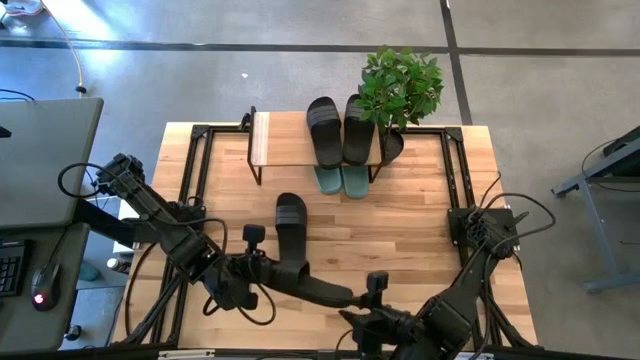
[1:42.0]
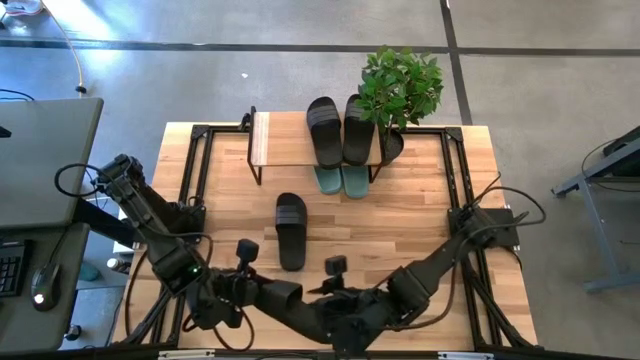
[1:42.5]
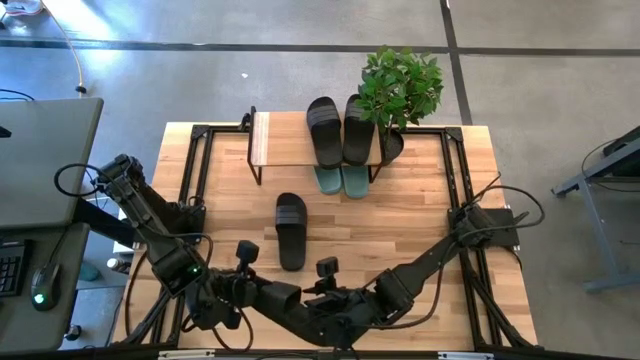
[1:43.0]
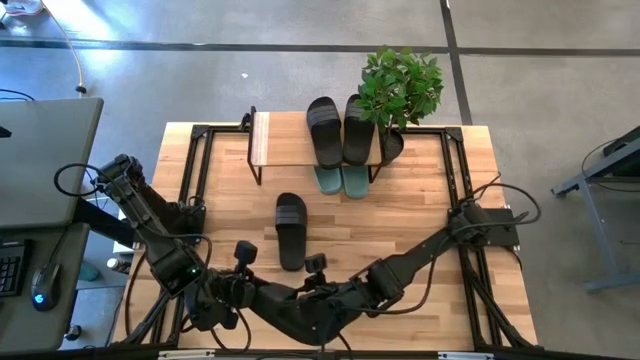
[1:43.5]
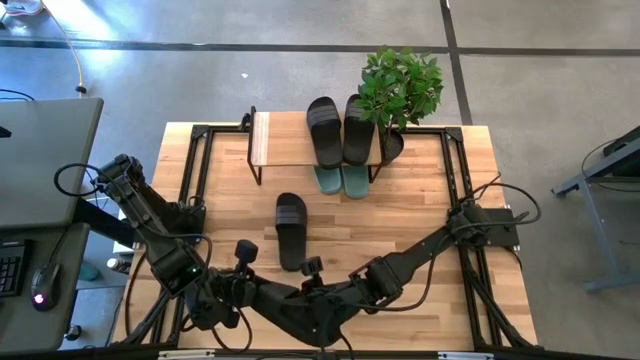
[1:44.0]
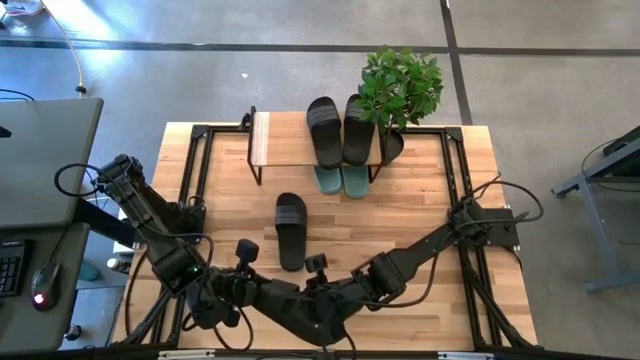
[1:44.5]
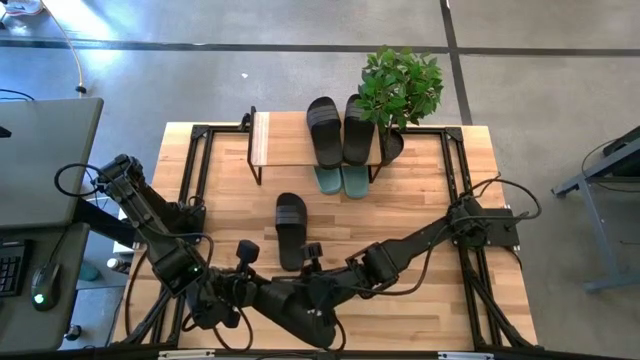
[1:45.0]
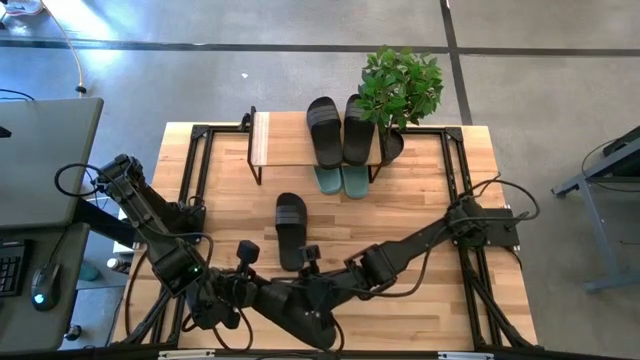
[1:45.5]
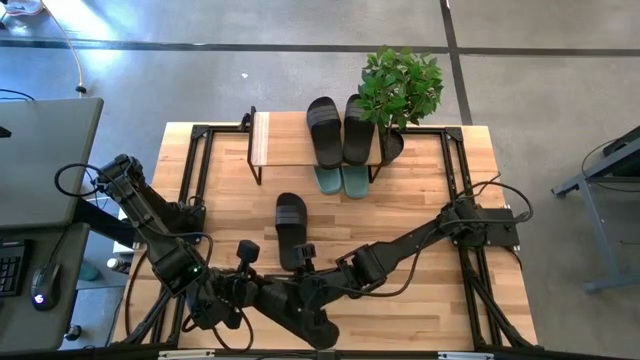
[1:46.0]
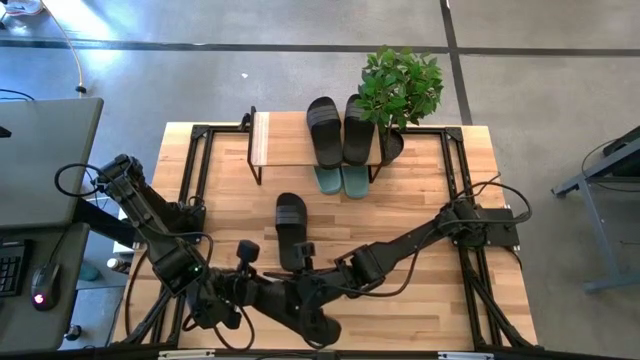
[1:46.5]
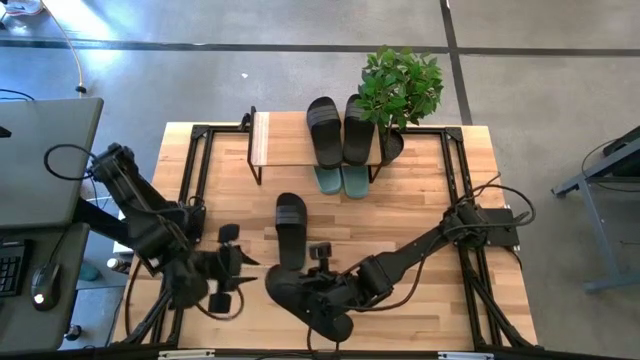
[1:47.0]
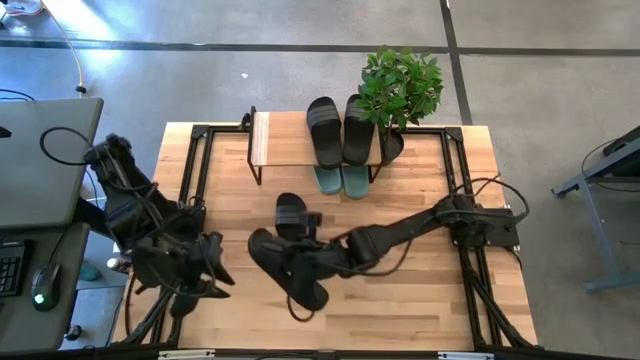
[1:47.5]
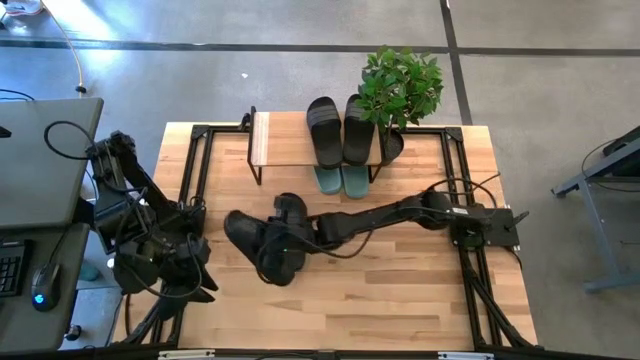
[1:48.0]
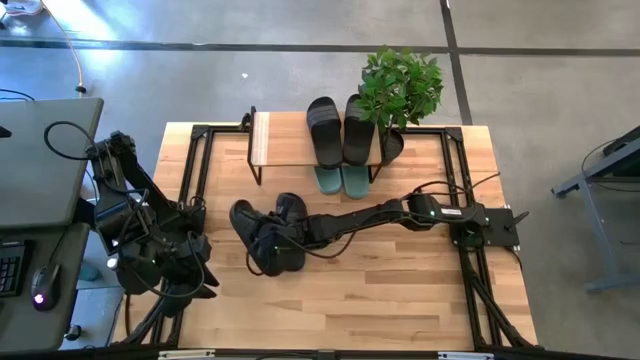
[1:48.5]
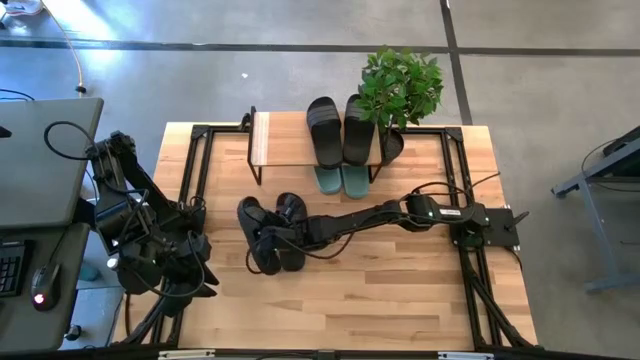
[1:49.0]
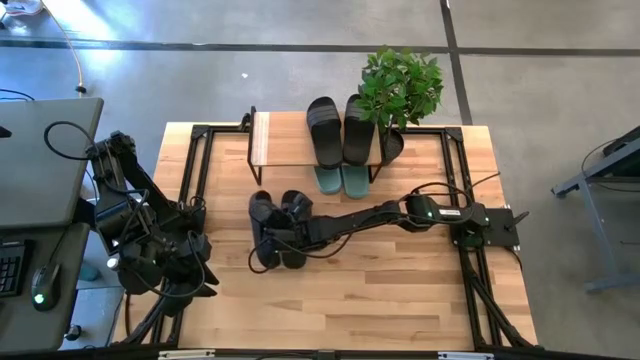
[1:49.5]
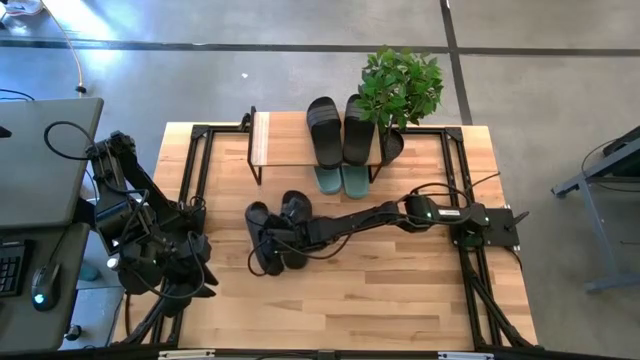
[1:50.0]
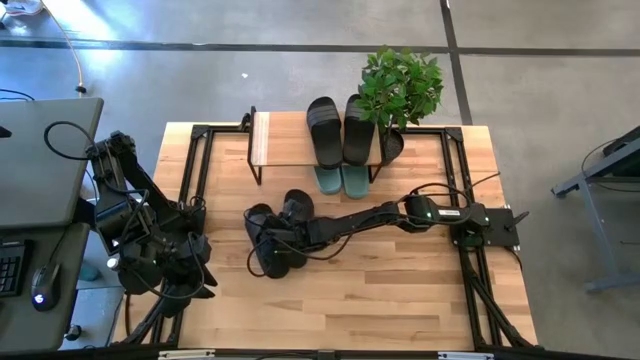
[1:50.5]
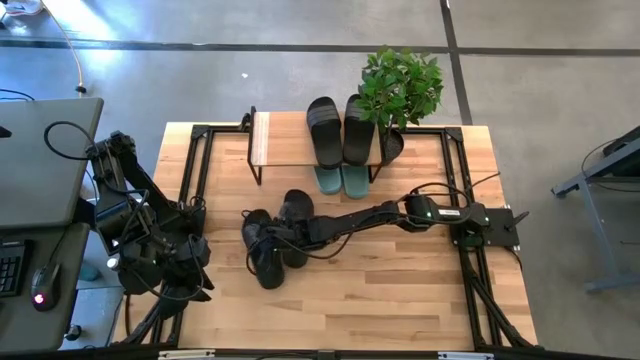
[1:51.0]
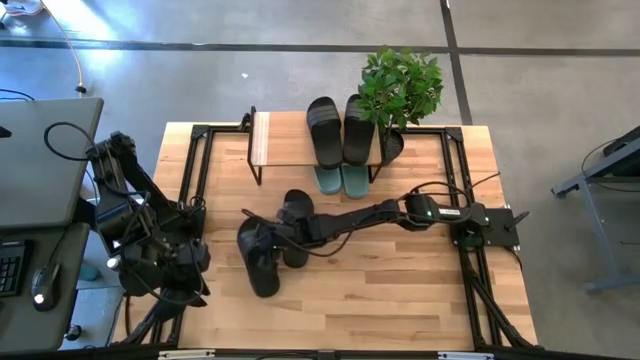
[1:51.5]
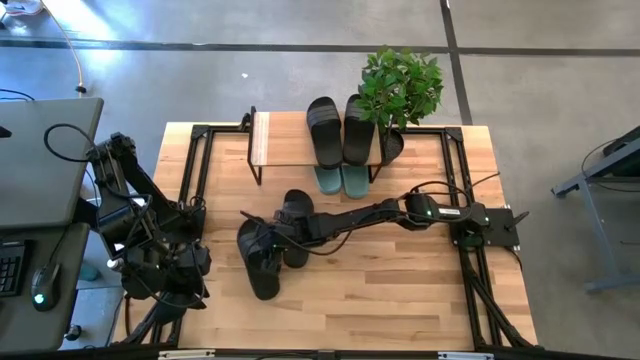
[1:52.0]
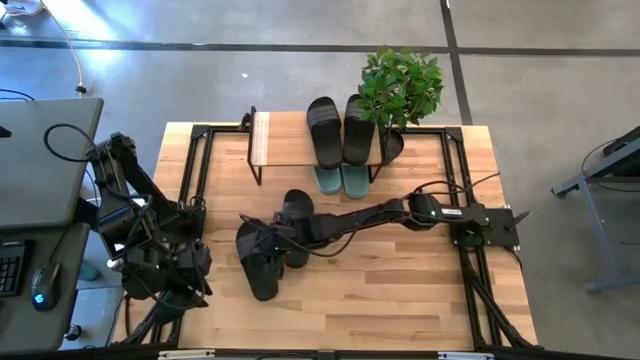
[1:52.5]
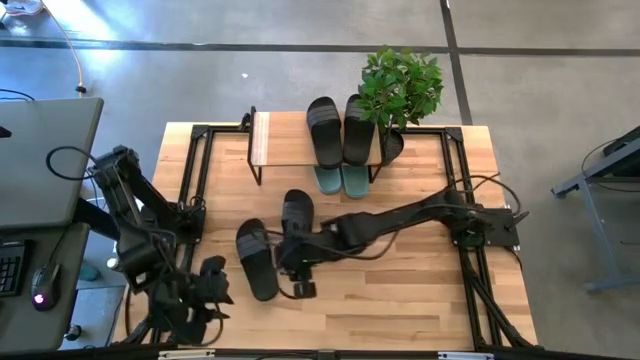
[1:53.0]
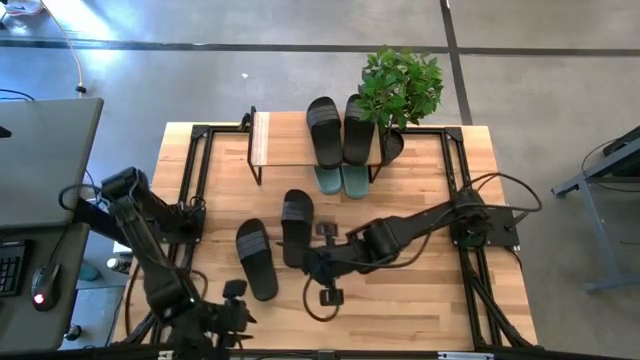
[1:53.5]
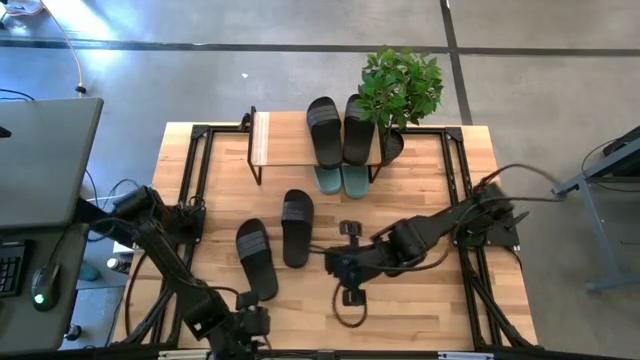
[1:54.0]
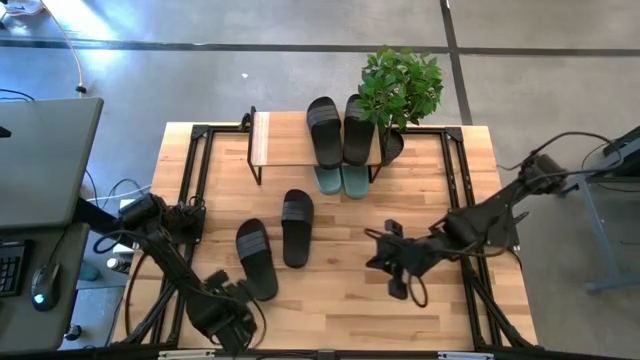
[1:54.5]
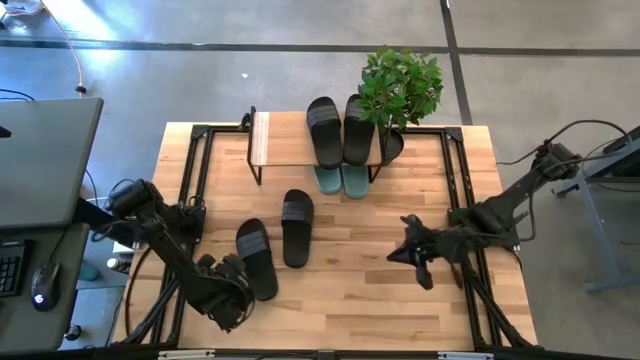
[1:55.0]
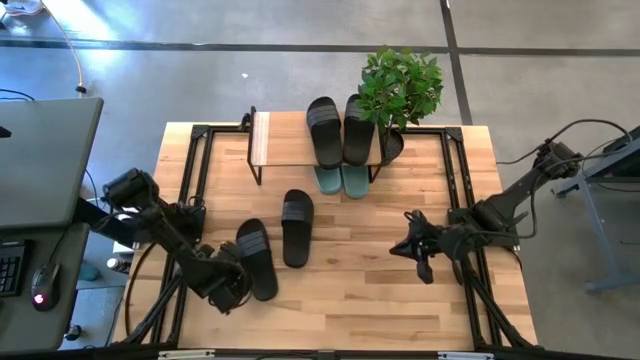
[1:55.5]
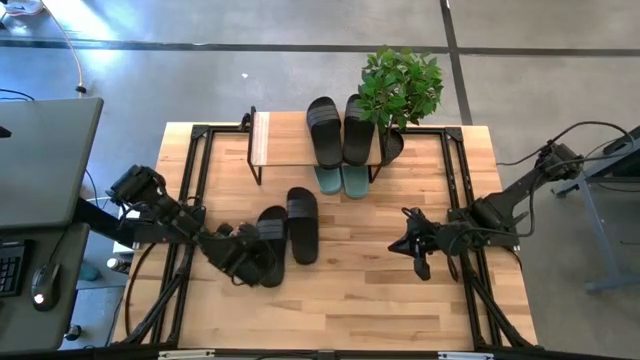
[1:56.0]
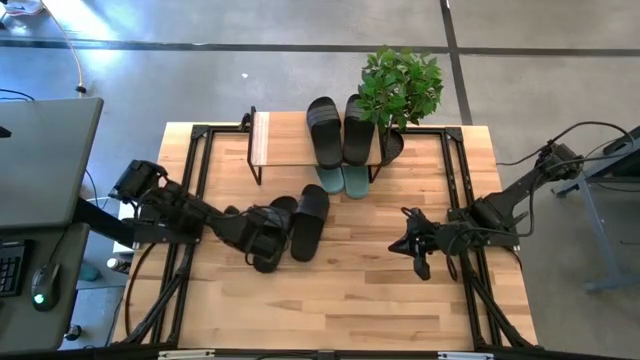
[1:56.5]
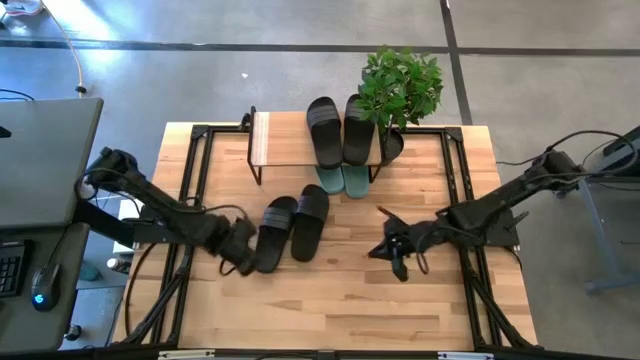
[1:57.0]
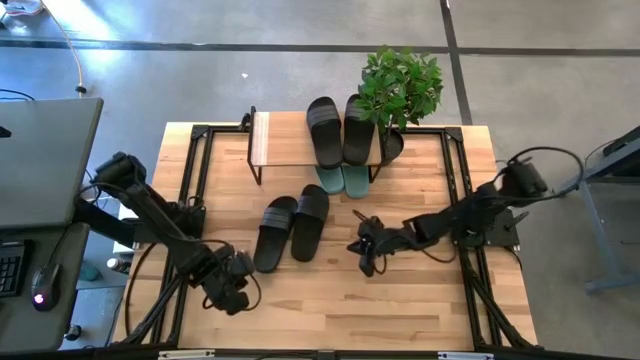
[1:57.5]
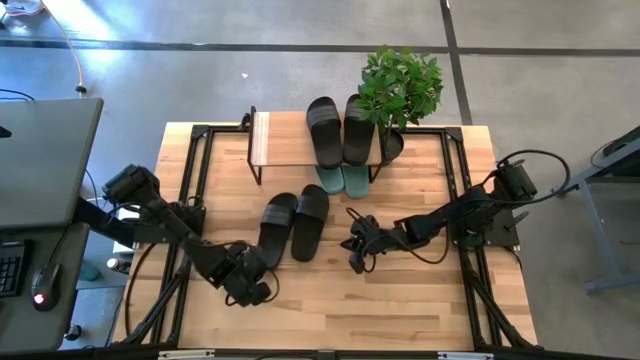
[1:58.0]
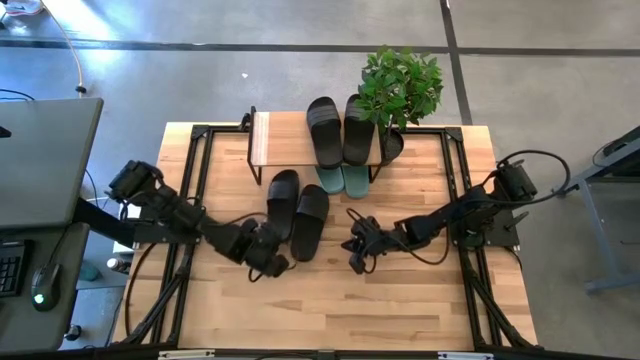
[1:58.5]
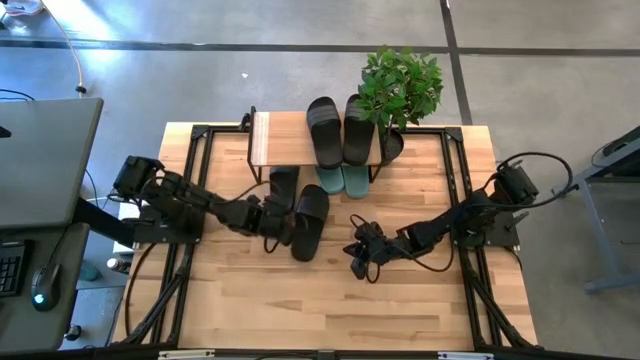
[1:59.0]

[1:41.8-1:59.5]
Task: Pick and place slides into the shelf
Put the black slipper under the shelf

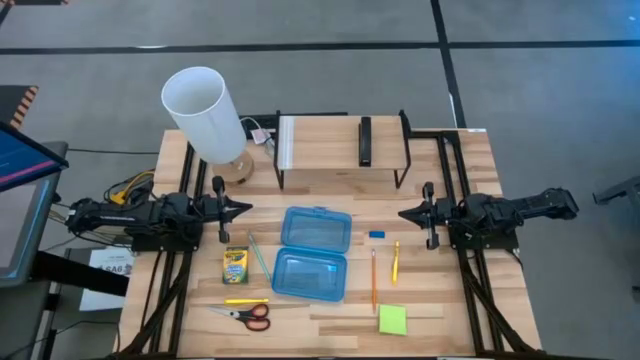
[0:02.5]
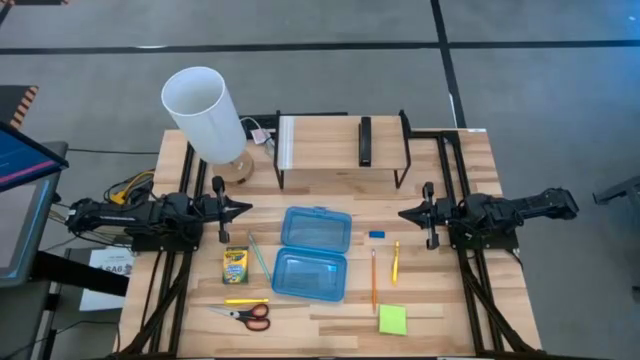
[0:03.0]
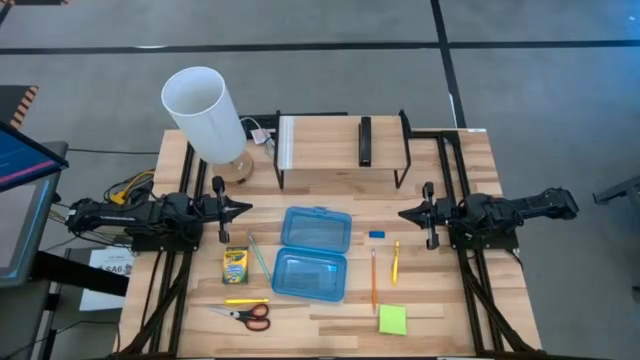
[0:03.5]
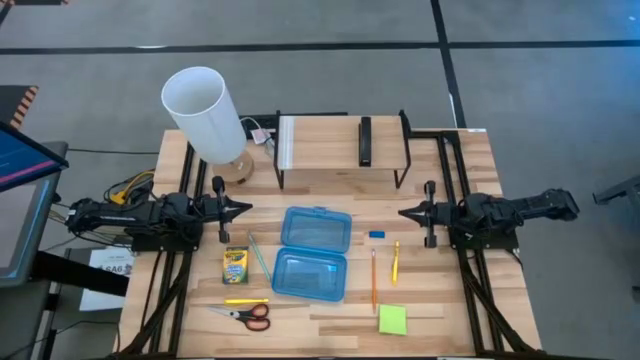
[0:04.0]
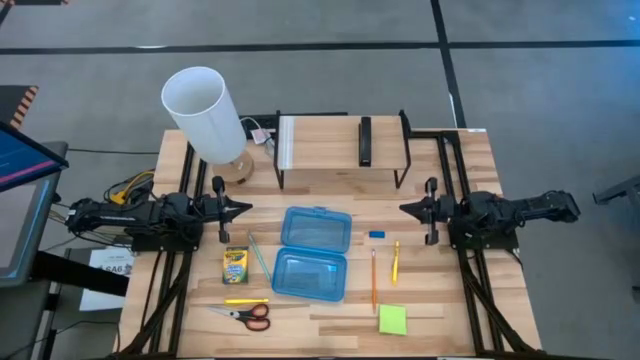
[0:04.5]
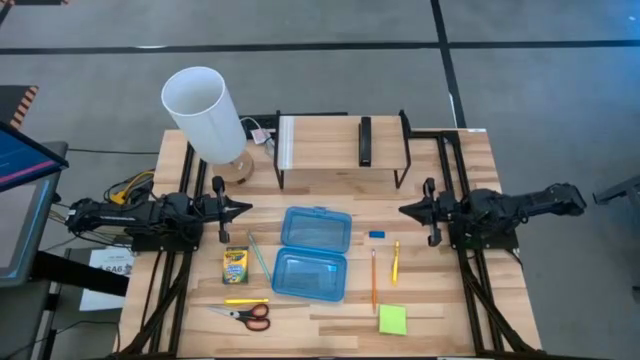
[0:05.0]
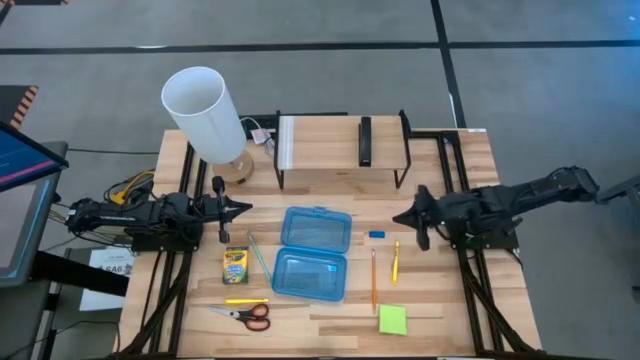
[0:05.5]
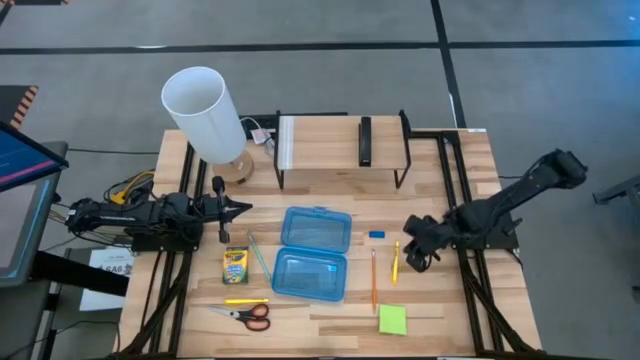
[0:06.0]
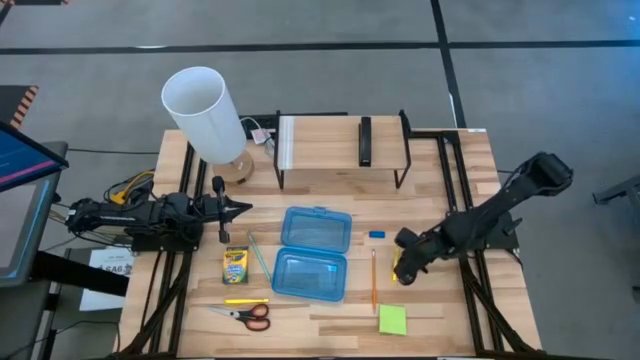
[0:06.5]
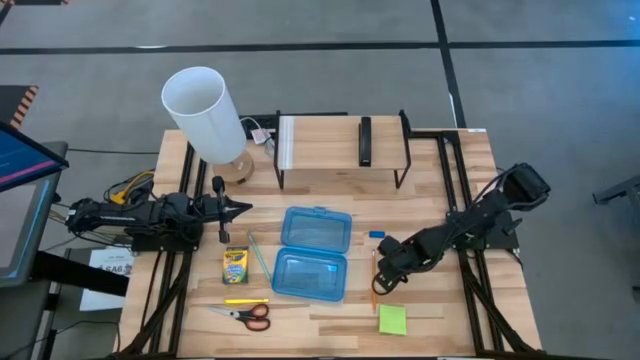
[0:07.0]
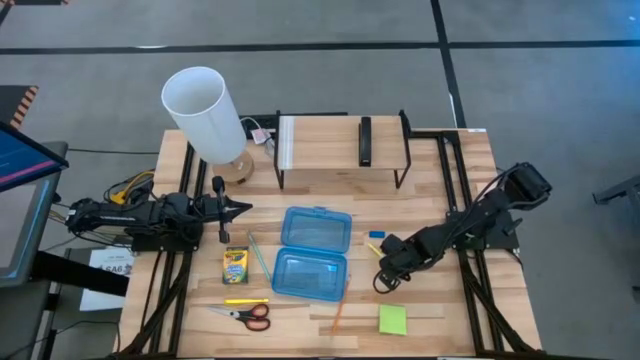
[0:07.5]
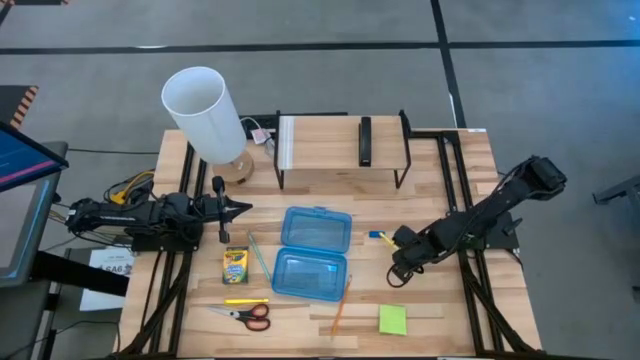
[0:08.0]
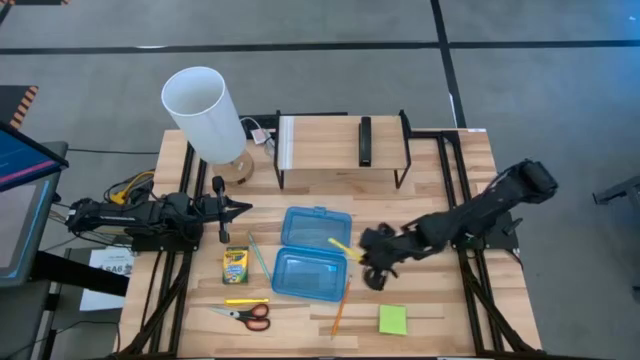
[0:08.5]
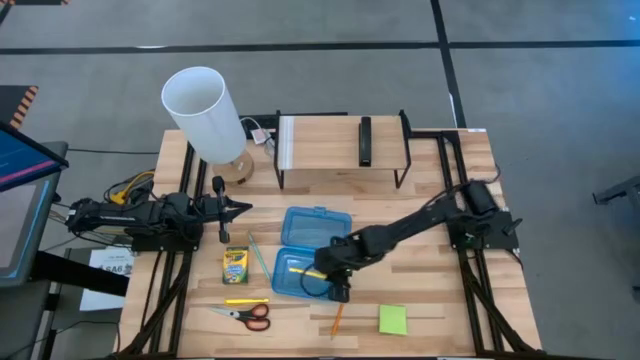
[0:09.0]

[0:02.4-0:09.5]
Task: Pack school essentials
Put the yellow pen into the blue supply box
